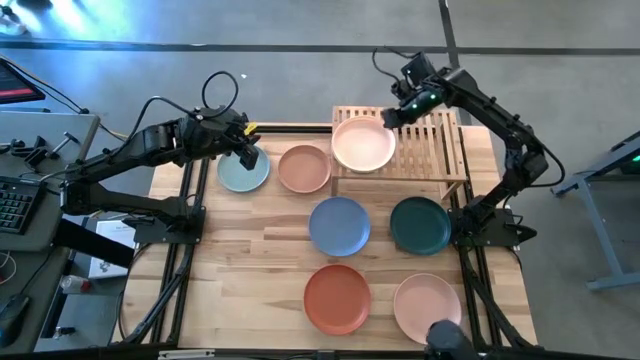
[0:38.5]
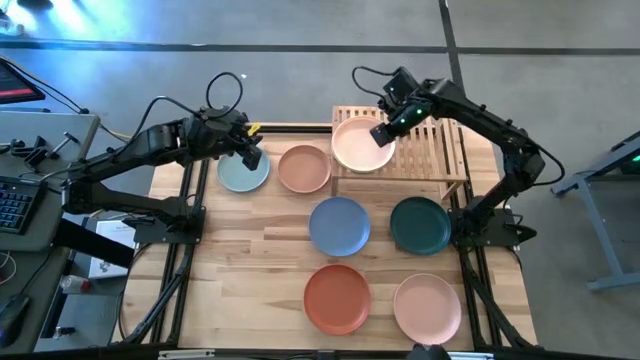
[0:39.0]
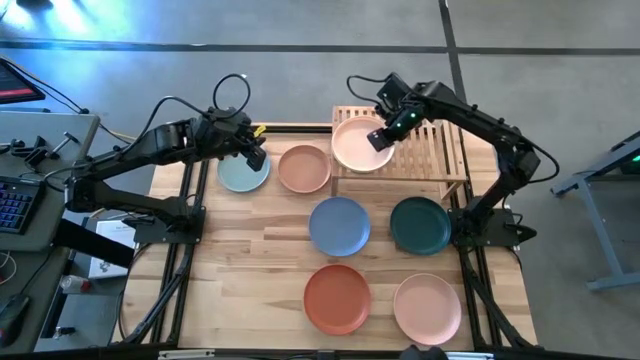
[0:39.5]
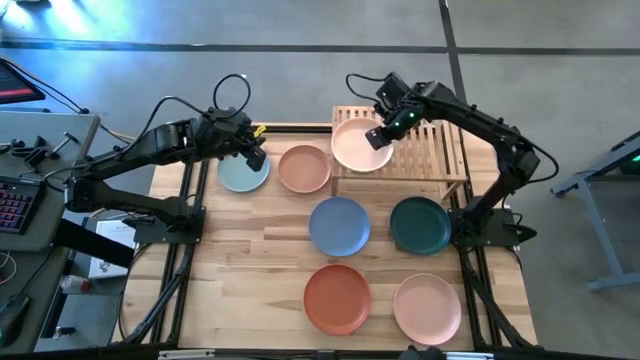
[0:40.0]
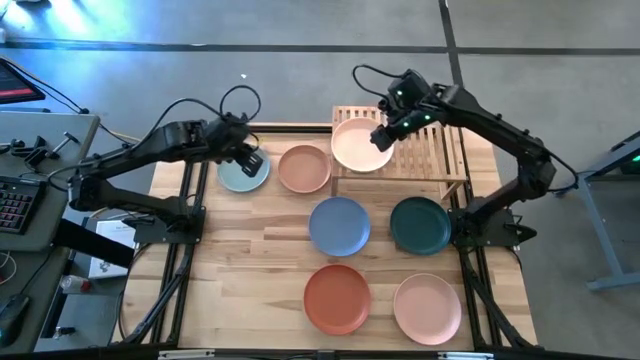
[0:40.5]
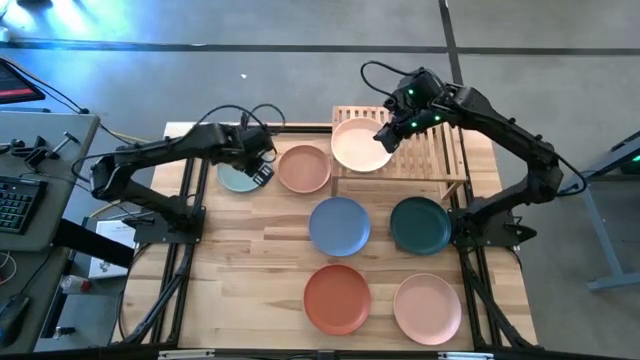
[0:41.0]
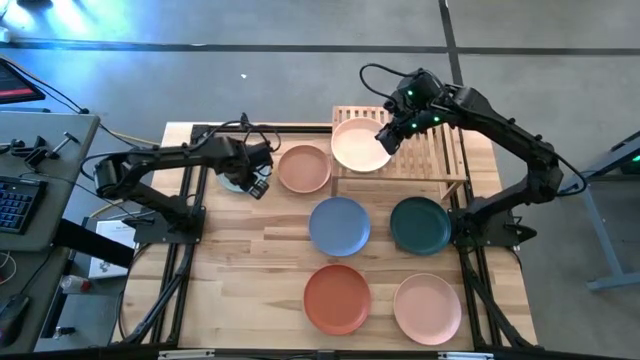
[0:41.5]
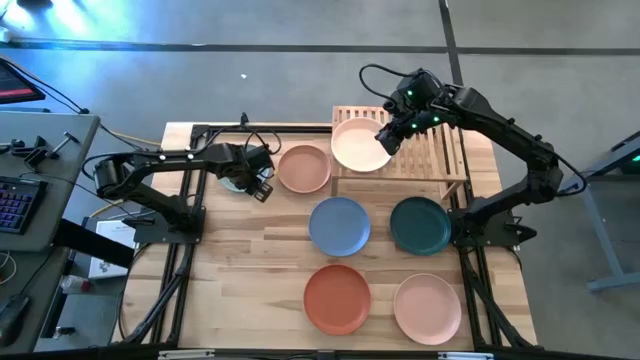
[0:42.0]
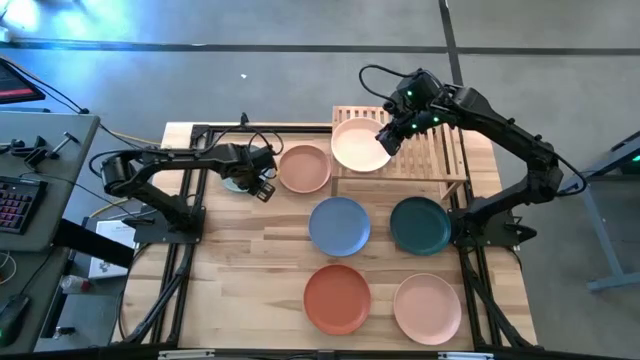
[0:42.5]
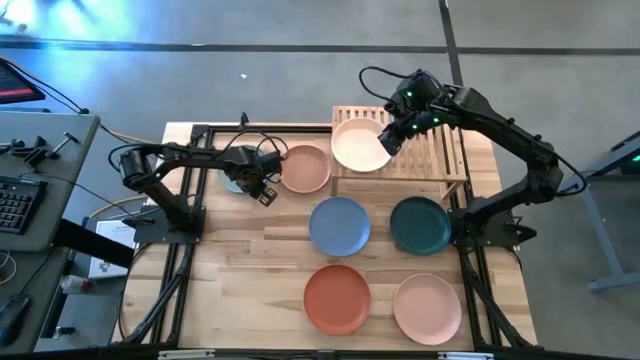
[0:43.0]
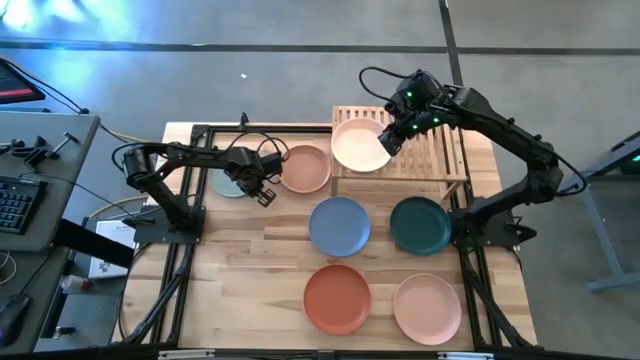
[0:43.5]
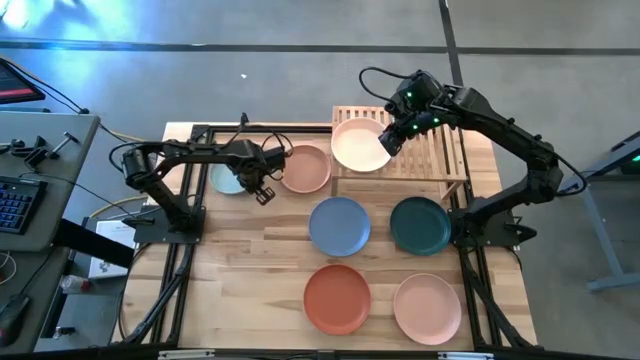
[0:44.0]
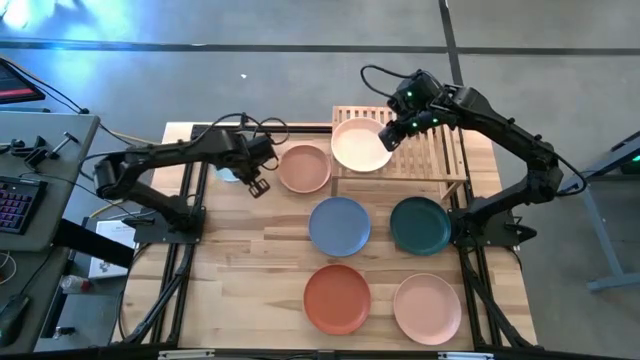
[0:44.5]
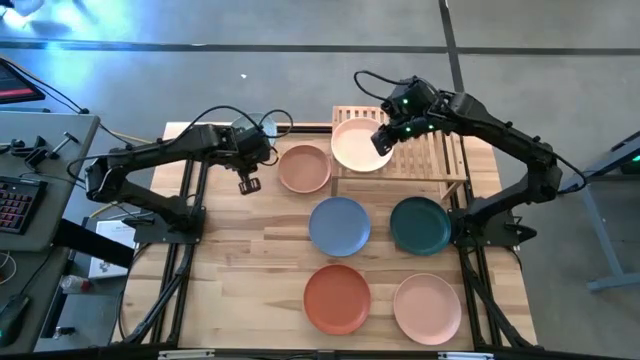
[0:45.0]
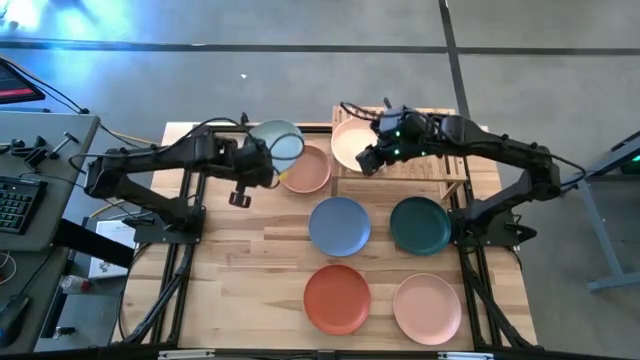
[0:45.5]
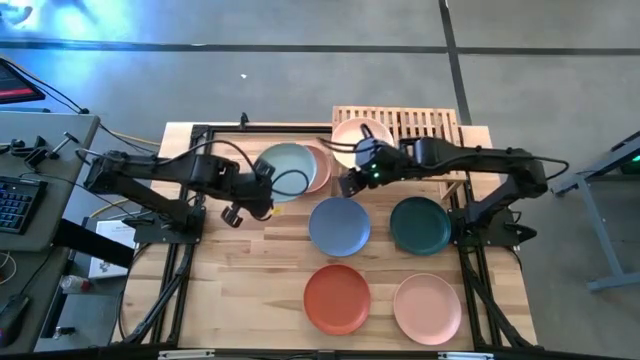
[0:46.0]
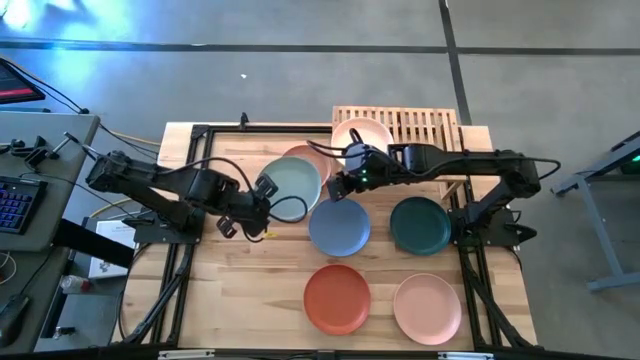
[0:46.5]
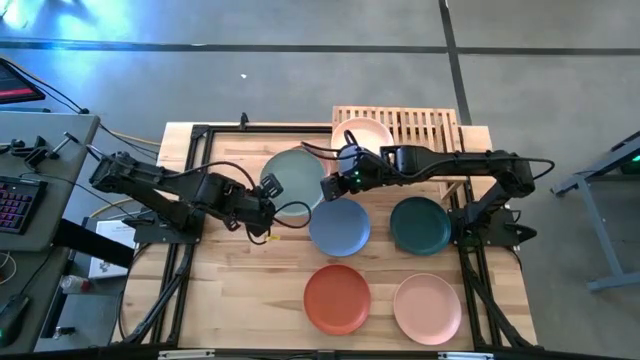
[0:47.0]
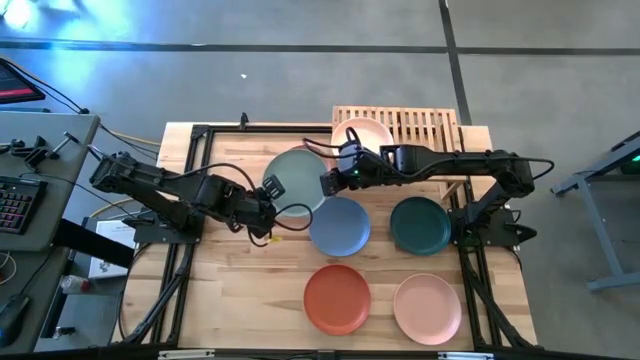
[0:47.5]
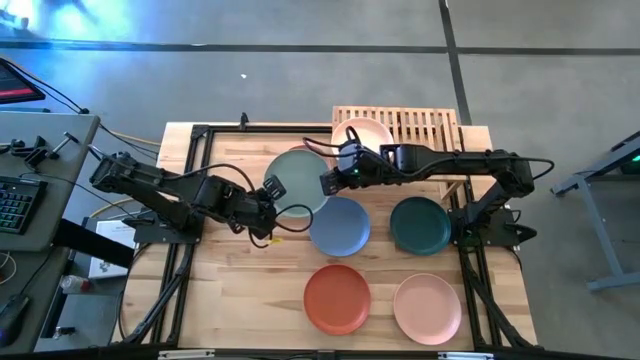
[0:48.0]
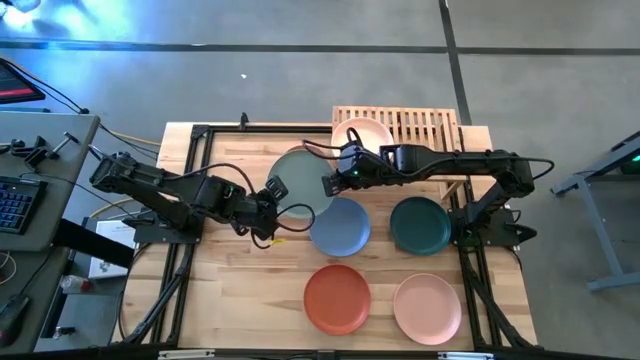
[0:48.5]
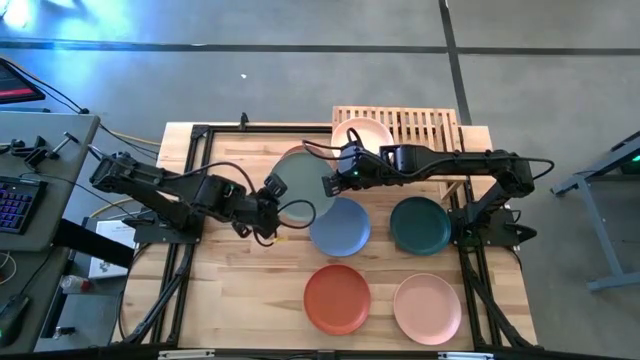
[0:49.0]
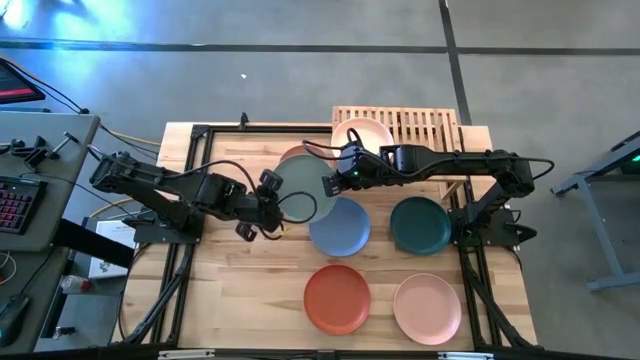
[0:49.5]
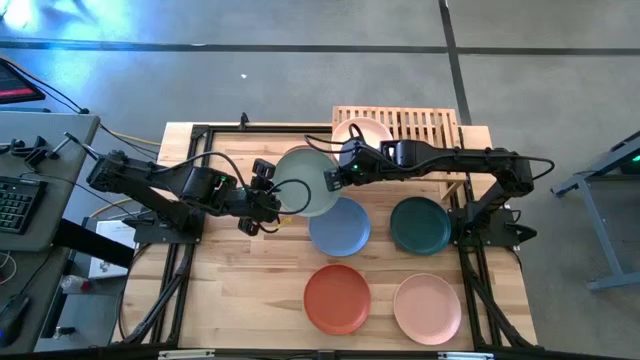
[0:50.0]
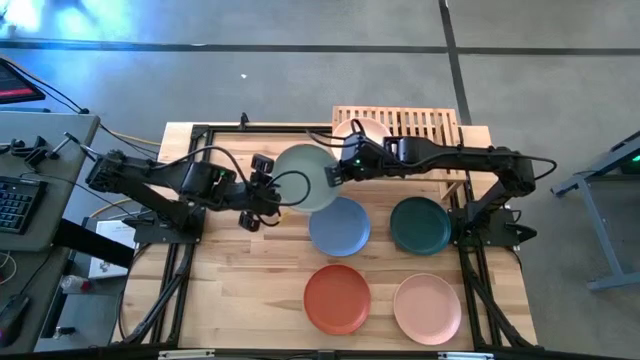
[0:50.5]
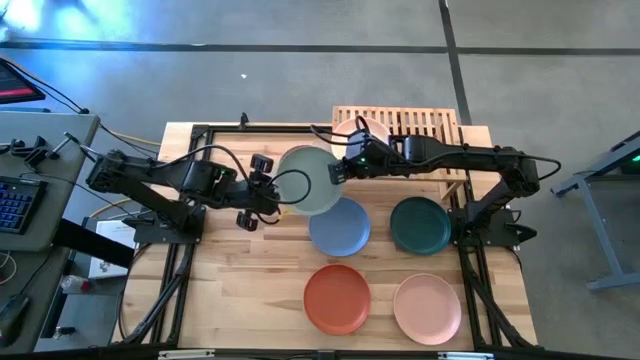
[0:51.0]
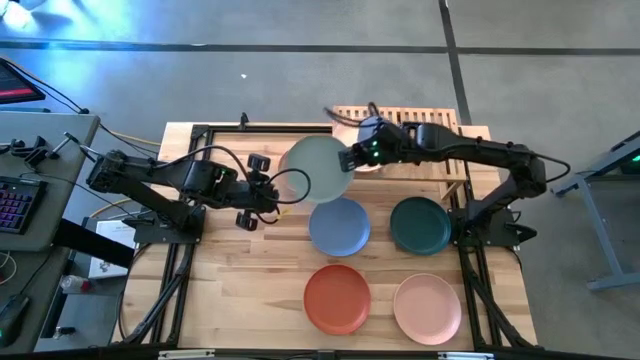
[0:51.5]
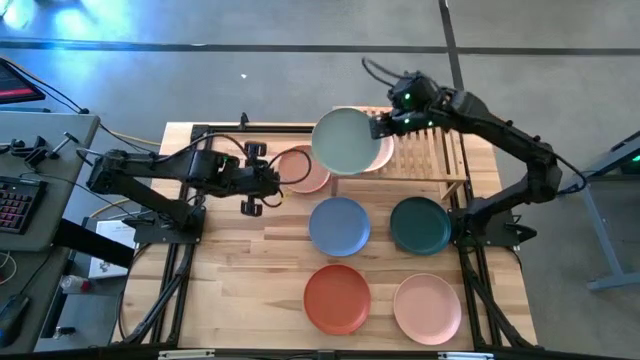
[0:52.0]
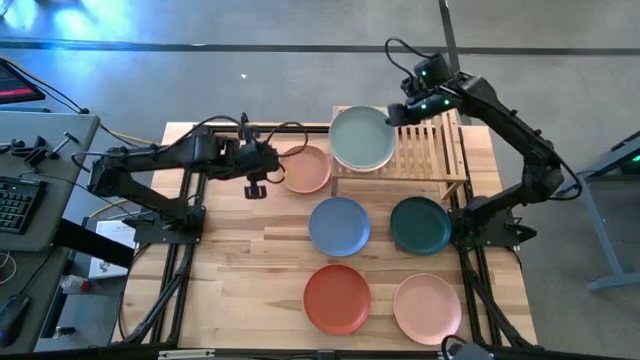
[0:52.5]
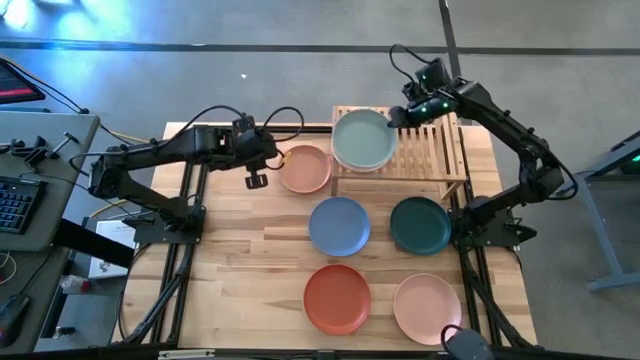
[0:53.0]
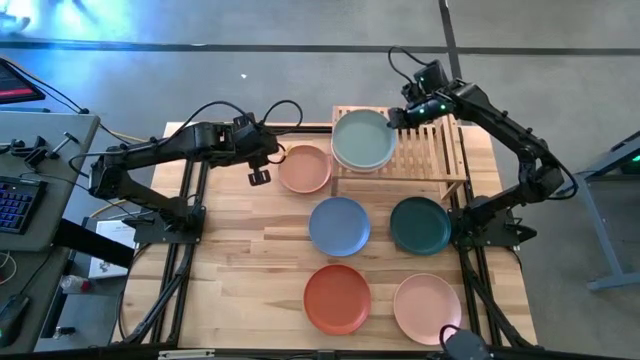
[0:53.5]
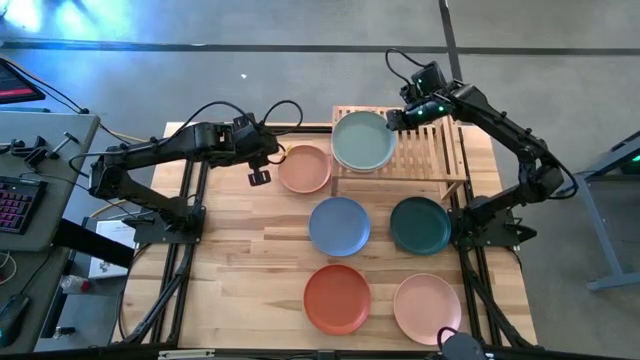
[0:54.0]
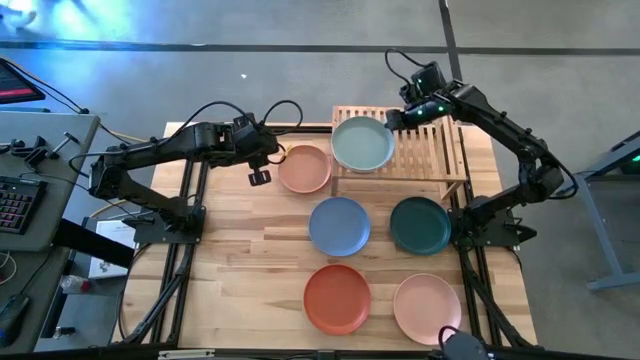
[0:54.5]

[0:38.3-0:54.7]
Task: Place and stack plates onto a shelf
Stack the light blue plate on top of the light orange plate

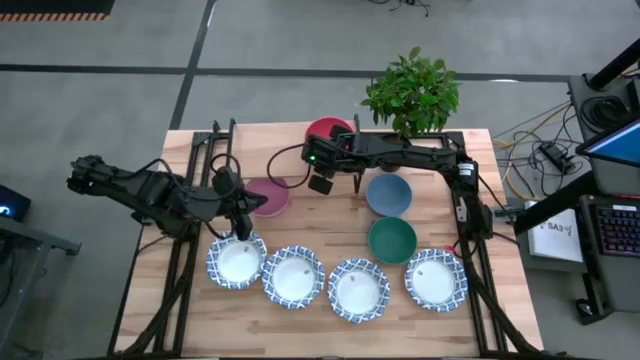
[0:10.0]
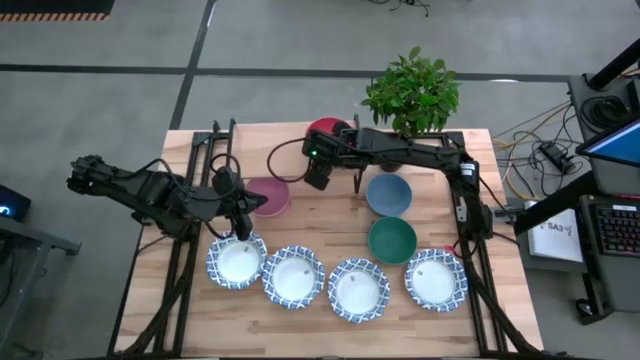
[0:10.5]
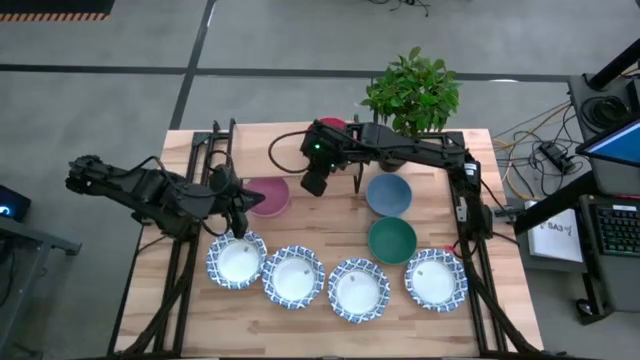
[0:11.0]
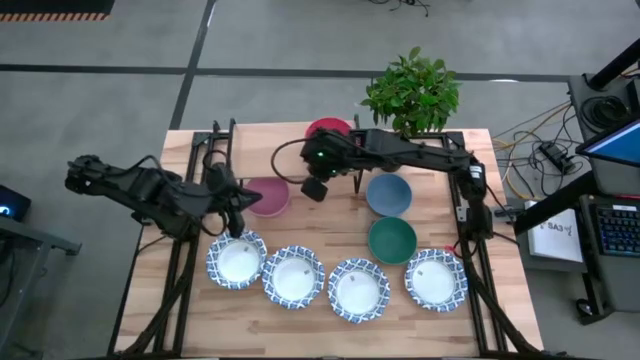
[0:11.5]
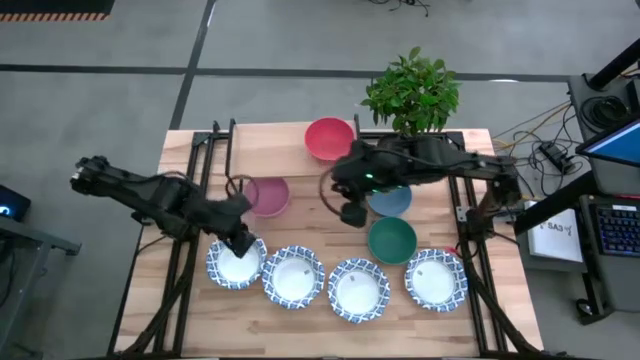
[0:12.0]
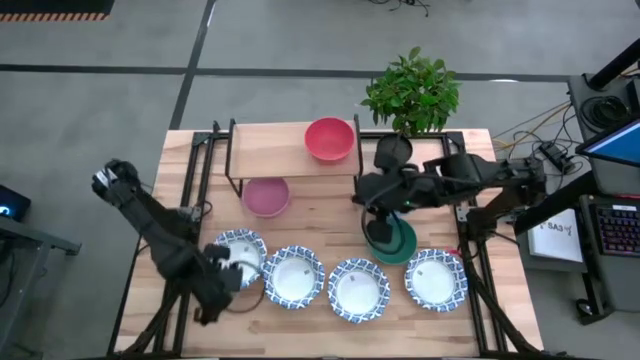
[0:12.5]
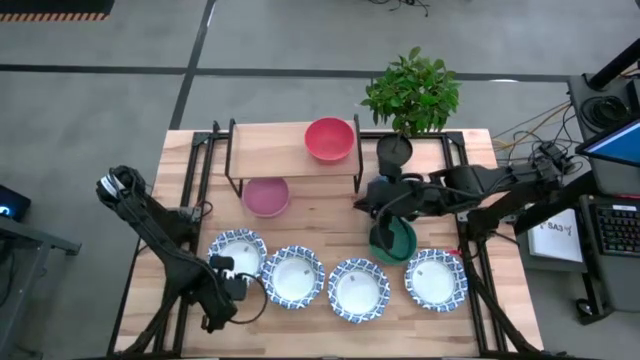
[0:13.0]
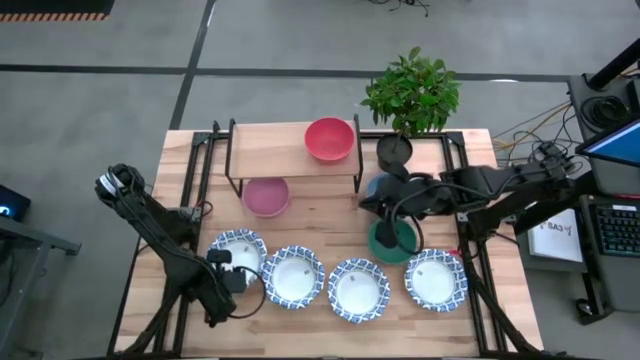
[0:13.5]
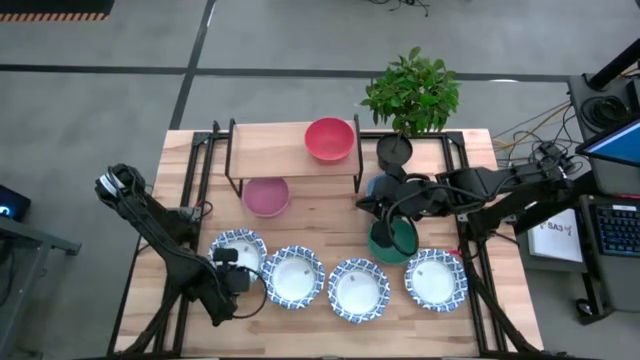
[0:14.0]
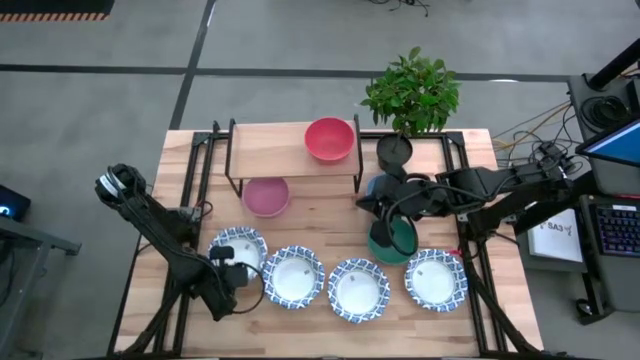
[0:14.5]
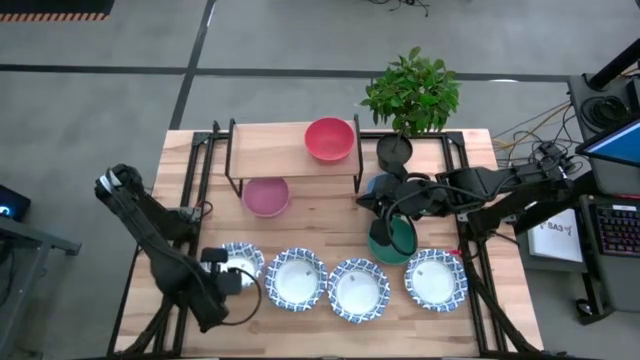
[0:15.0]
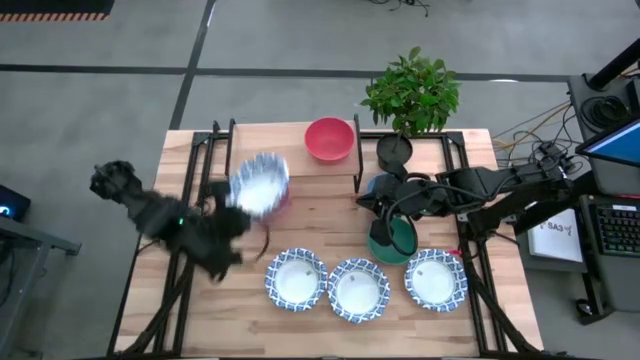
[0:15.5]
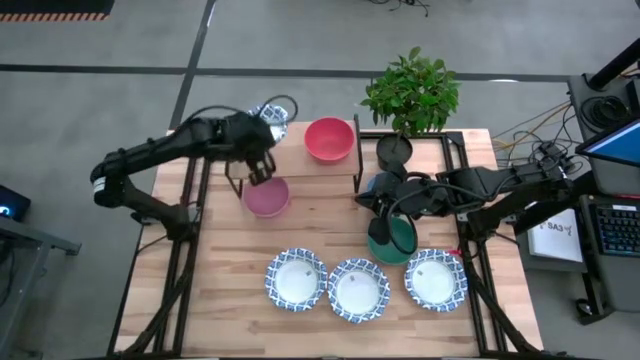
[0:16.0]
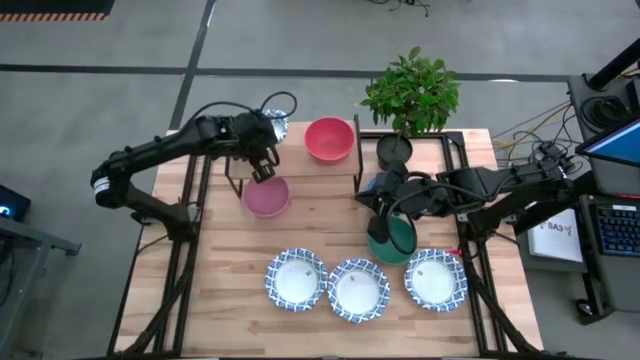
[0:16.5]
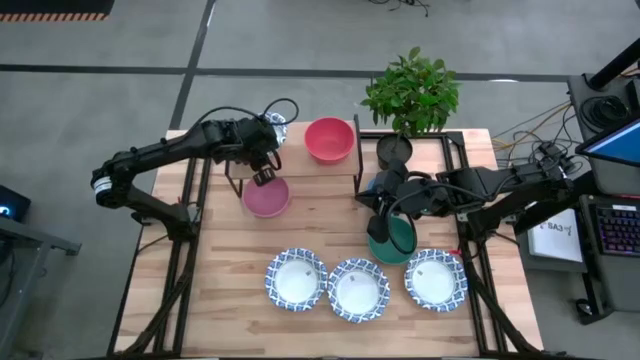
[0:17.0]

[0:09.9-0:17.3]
Task: Place and stack bowls onto a shelf
Put the white pattern paper bowl on the shelf
